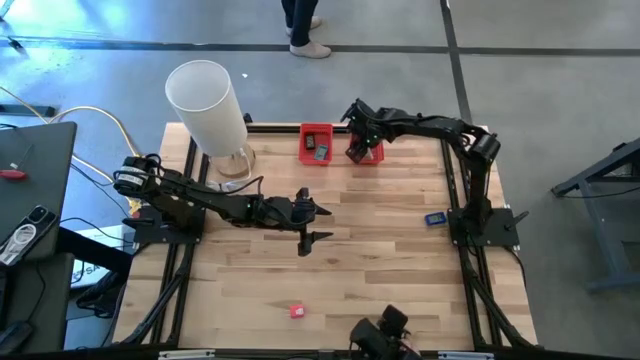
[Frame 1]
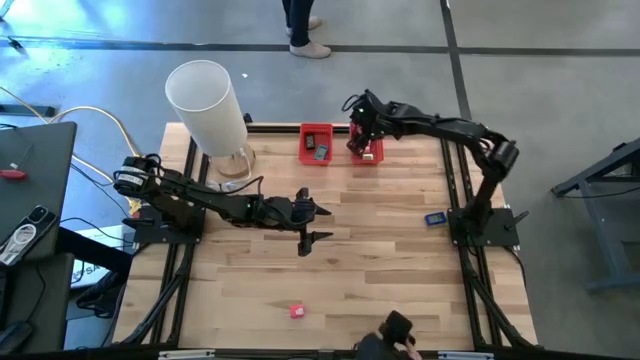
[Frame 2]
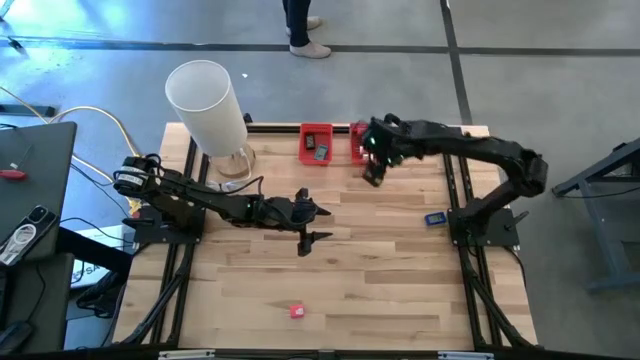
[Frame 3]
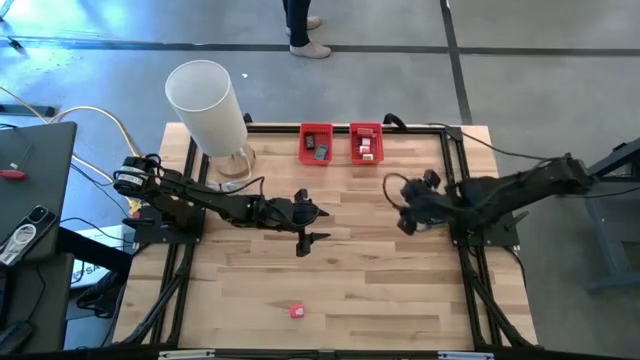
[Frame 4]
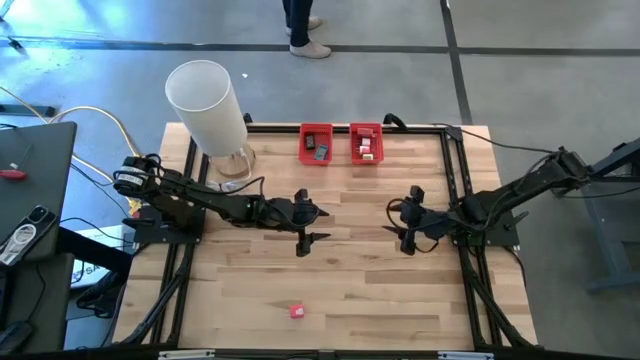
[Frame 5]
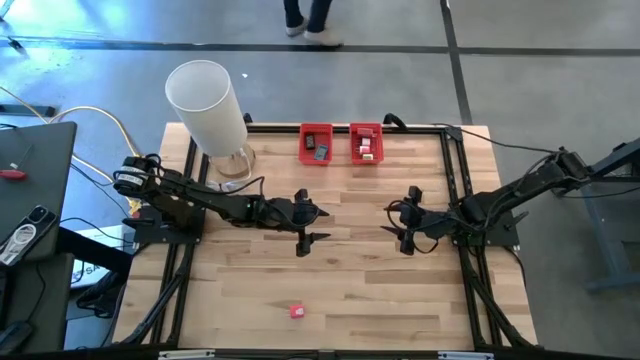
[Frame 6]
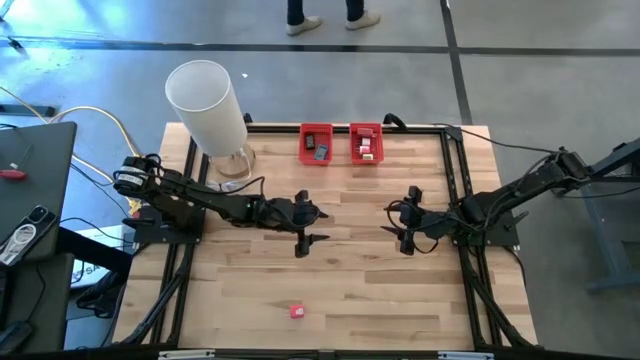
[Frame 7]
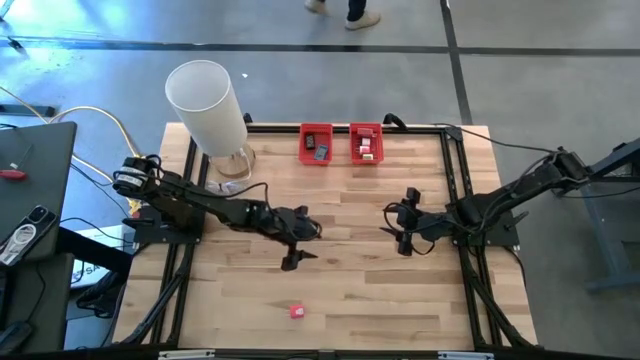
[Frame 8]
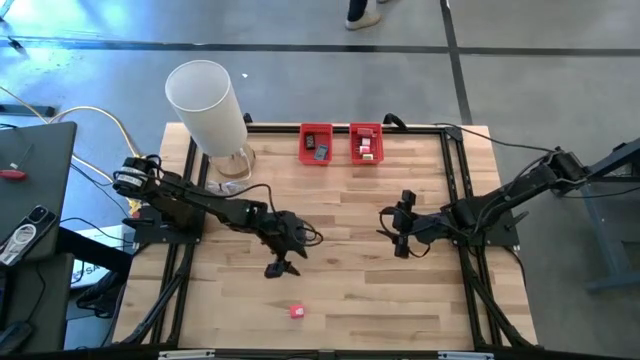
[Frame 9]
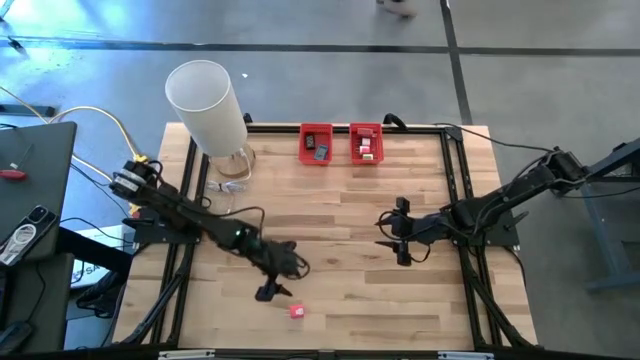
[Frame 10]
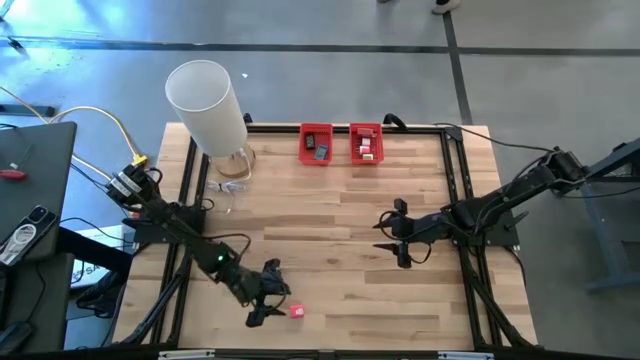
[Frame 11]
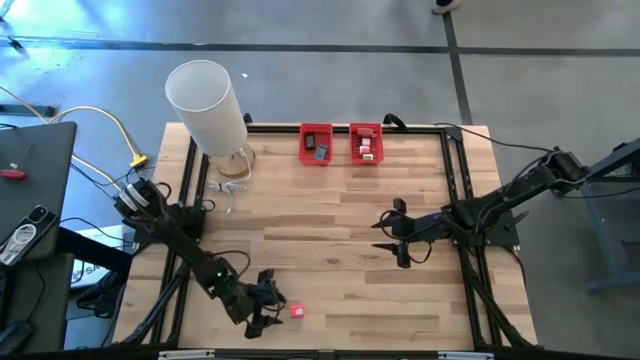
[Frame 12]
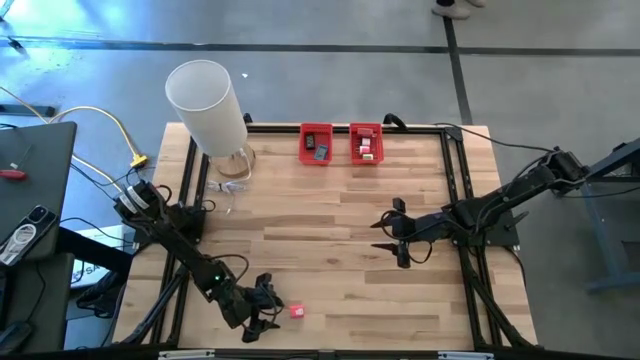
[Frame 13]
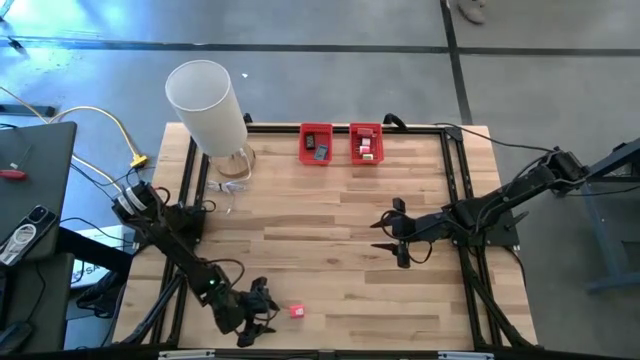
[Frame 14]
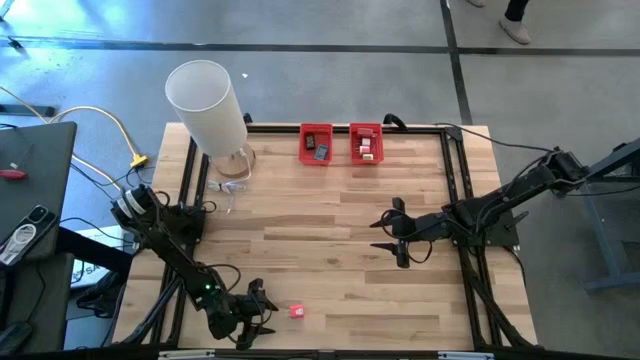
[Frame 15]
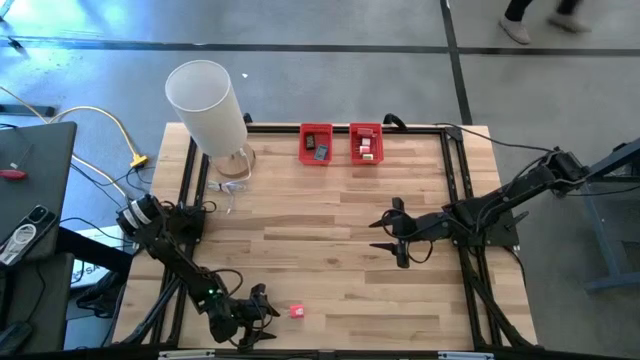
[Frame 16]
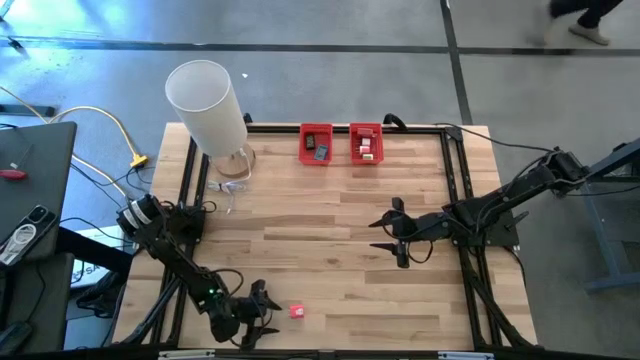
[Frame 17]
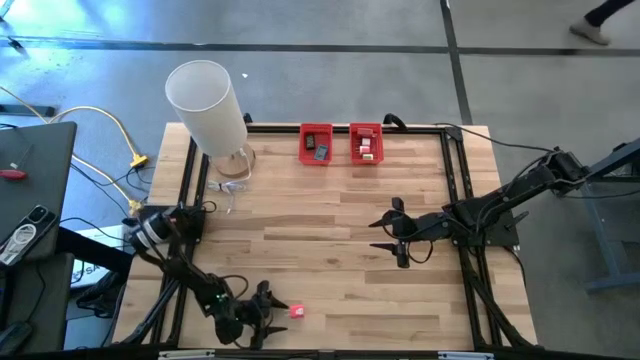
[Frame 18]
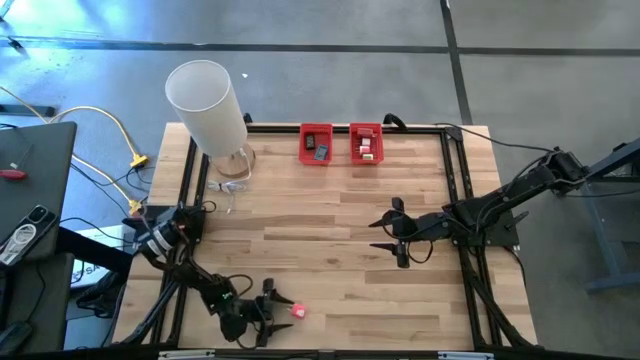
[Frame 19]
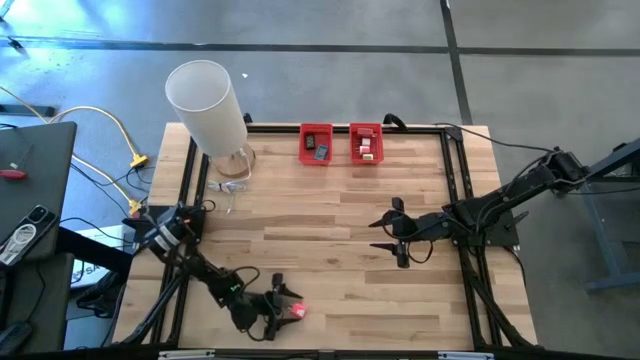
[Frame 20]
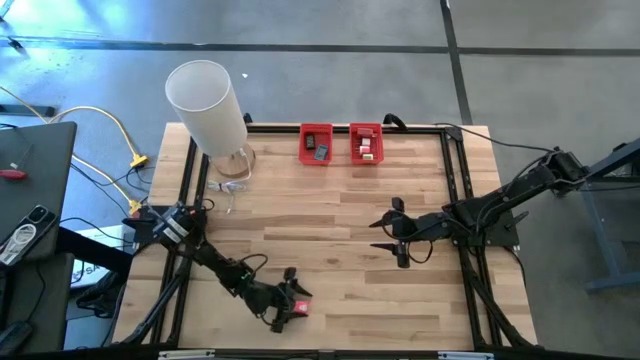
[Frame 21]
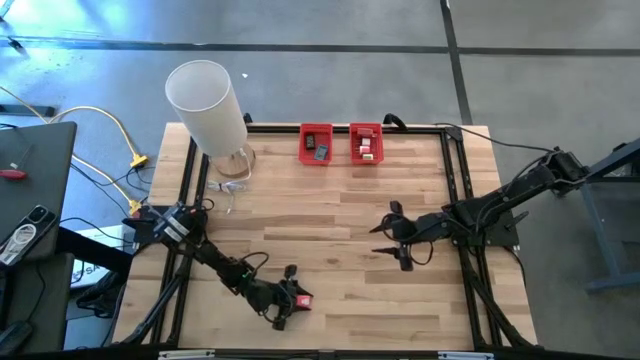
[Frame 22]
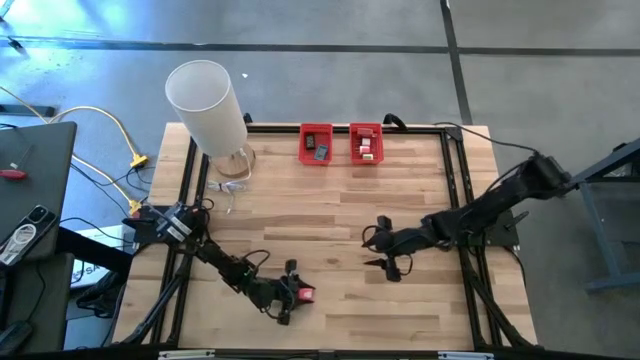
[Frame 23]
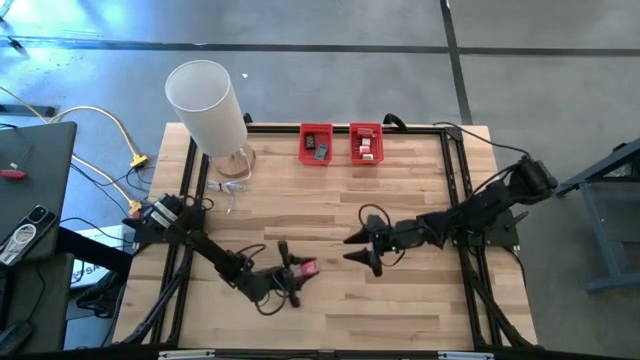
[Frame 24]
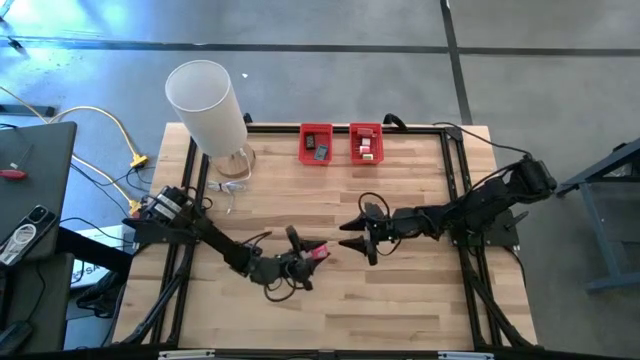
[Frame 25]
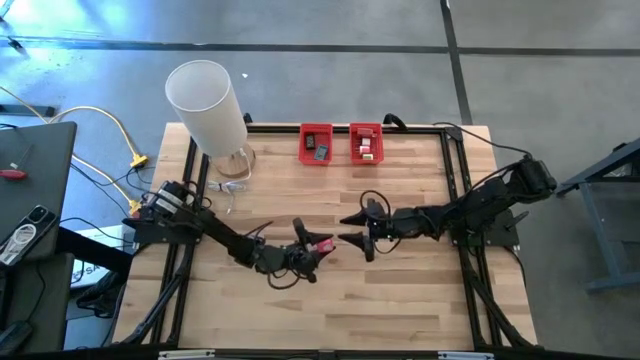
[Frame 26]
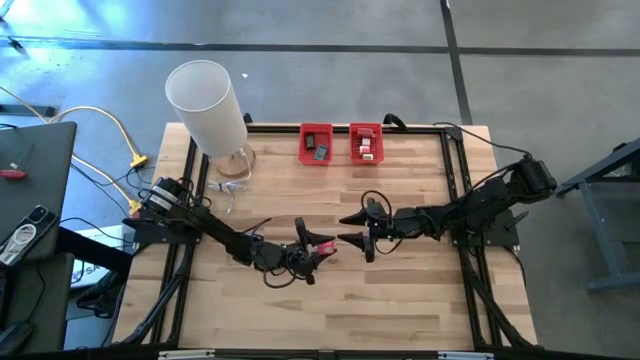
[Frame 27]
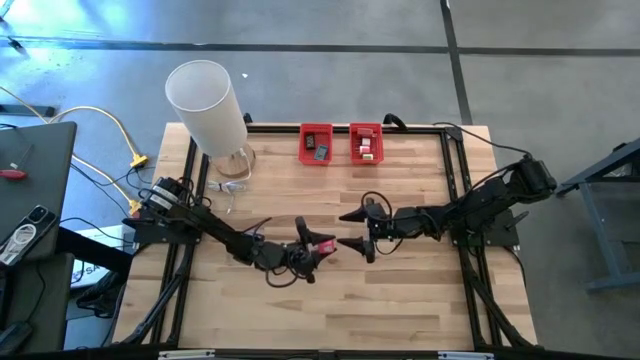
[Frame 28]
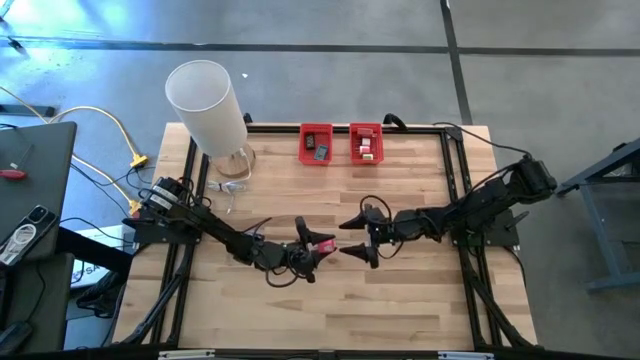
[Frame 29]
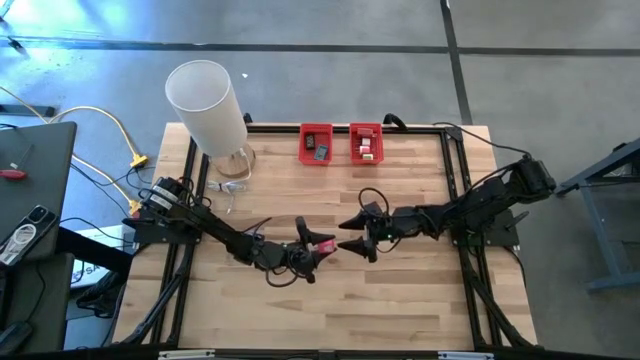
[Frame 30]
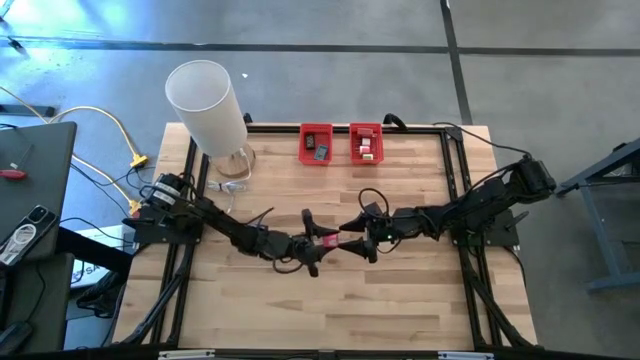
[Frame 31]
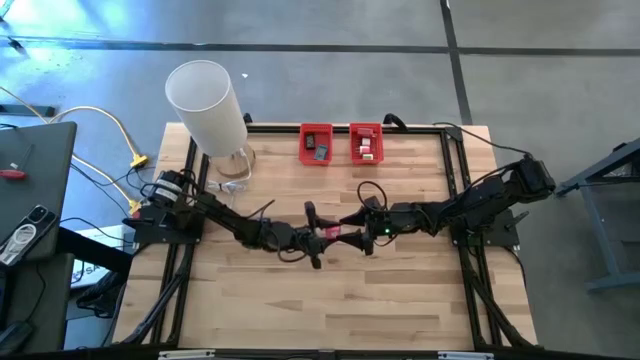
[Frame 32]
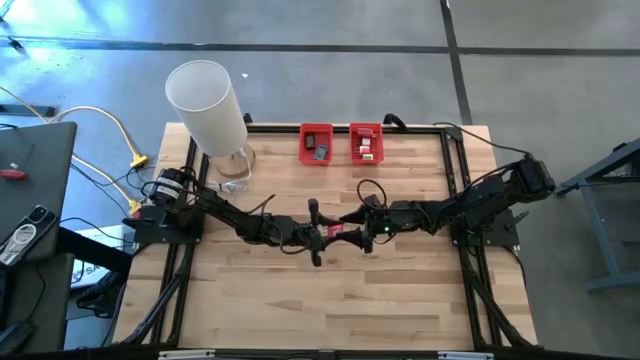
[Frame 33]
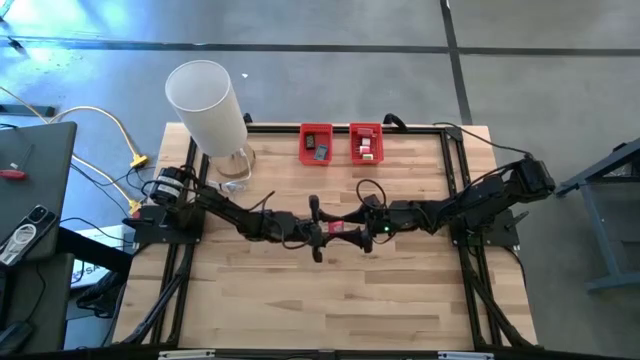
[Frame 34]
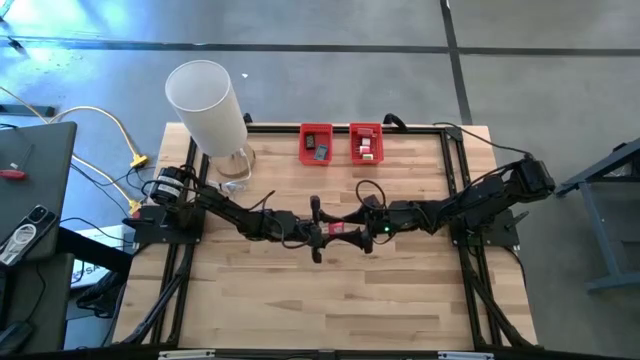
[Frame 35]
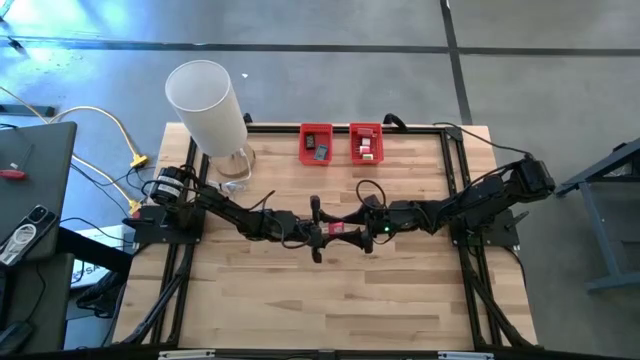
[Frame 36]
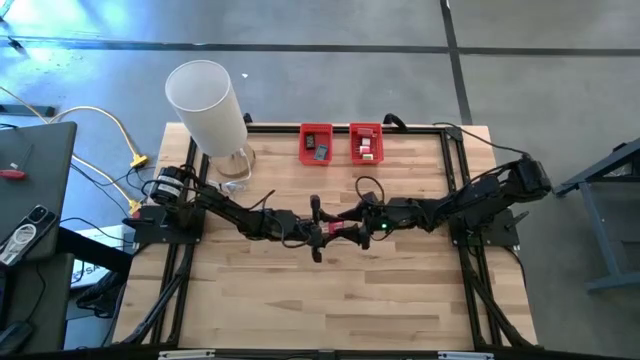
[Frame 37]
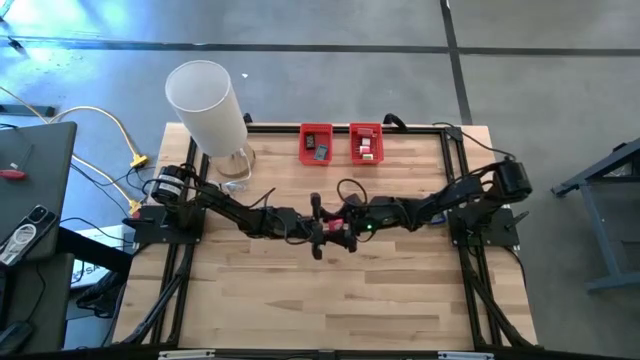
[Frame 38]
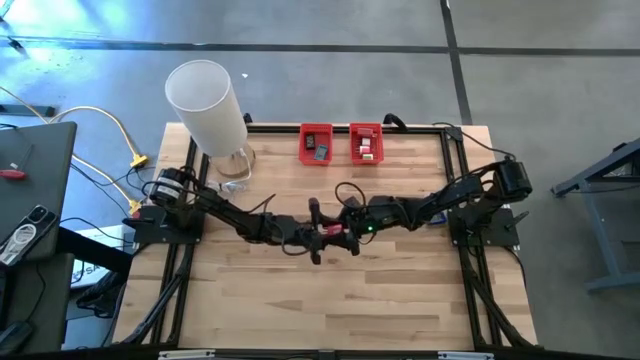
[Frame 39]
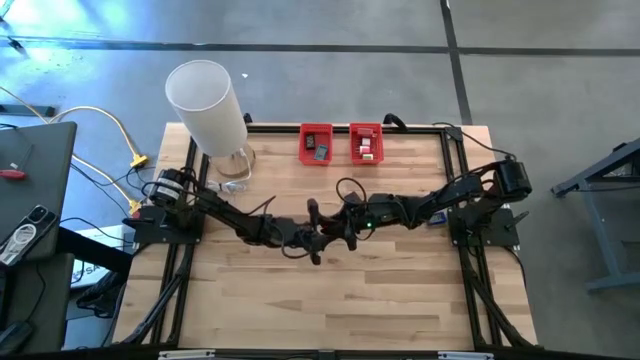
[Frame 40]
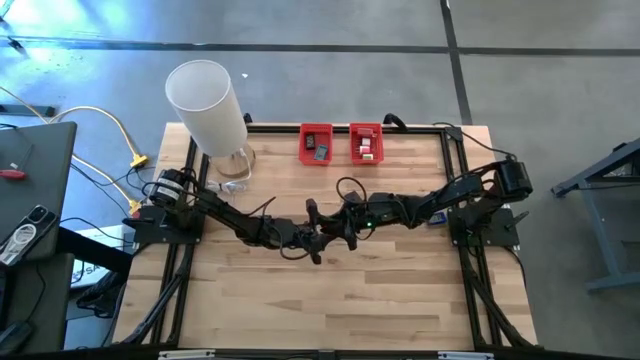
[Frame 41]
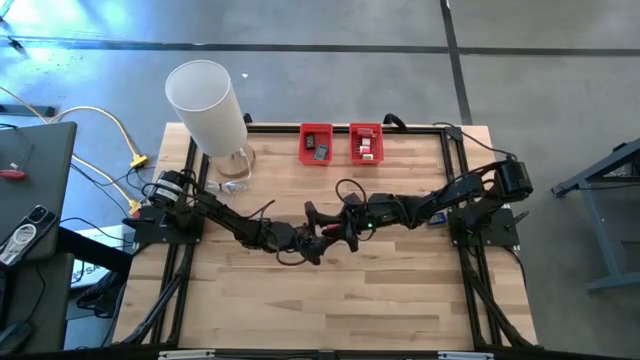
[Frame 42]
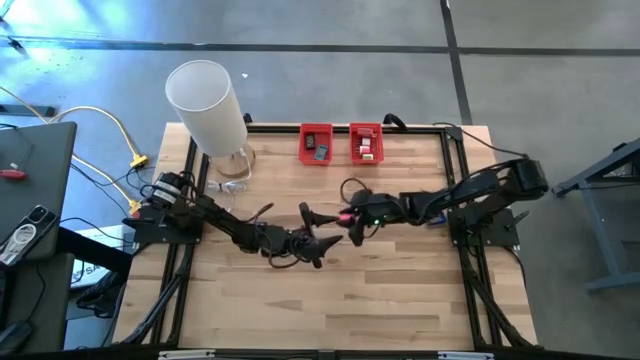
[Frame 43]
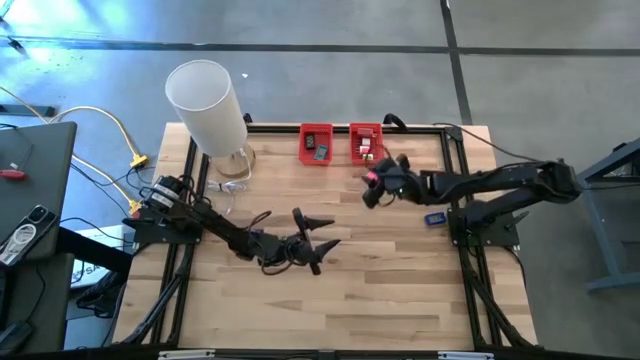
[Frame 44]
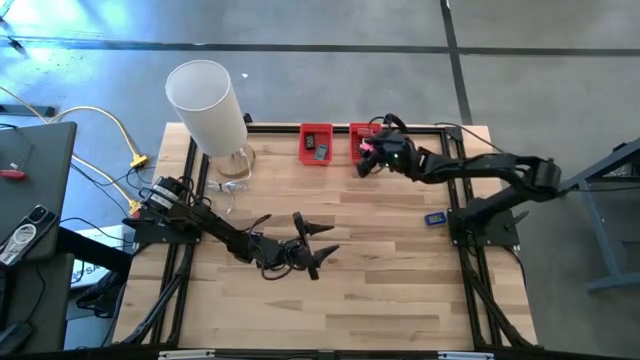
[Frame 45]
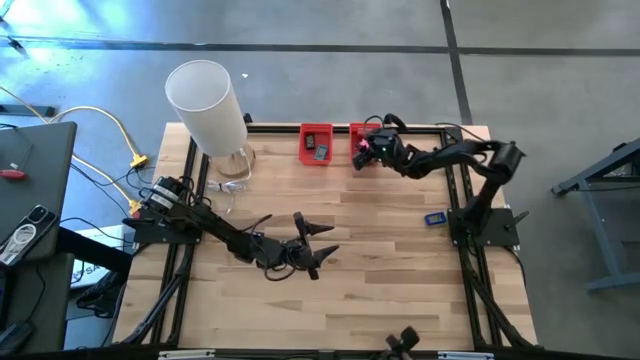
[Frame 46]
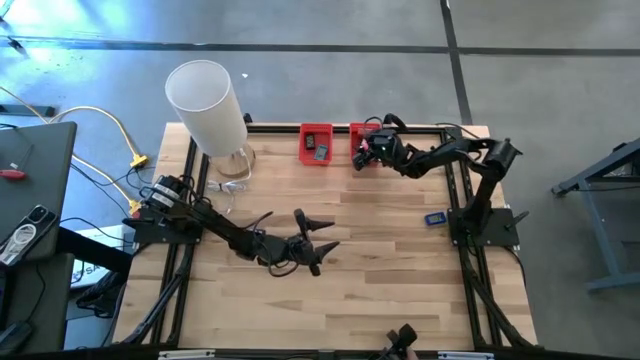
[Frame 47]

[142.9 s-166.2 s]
Task: Pick & Place Office items
Put the pink charger adapter into the right red bin
